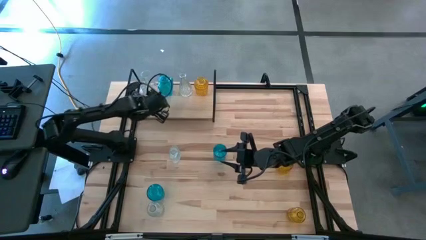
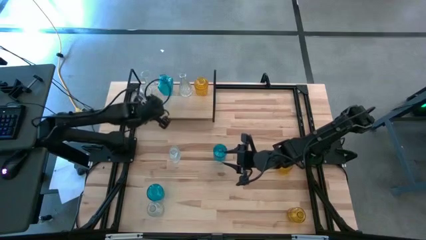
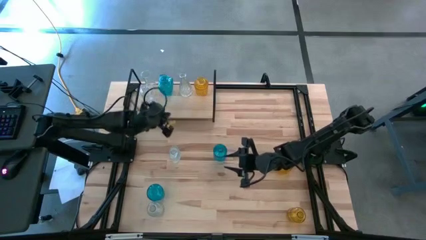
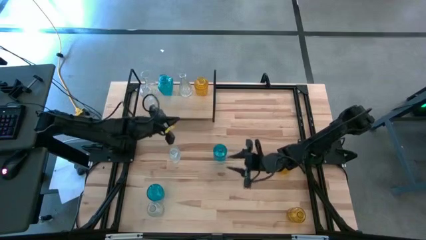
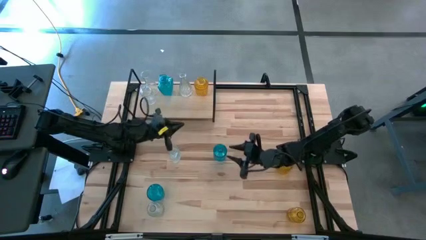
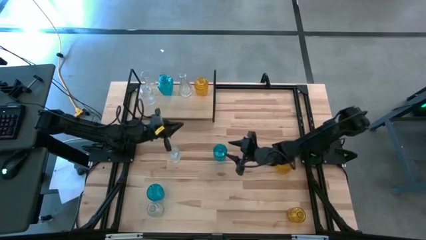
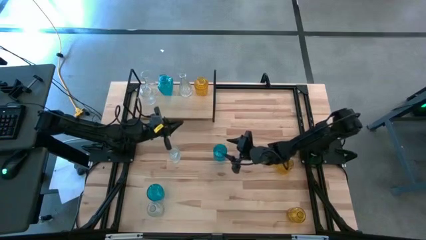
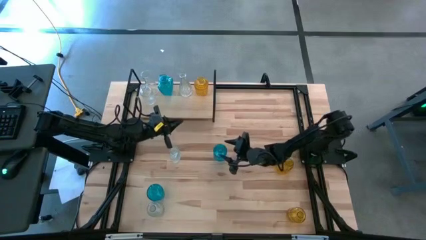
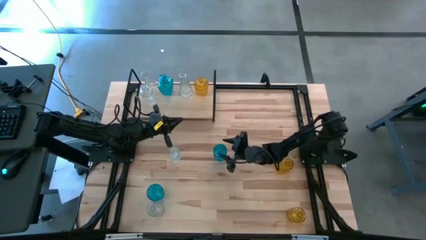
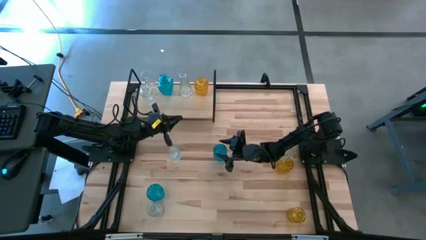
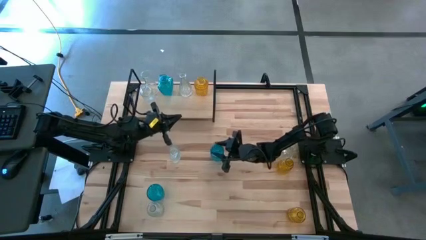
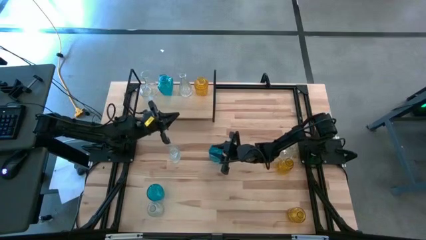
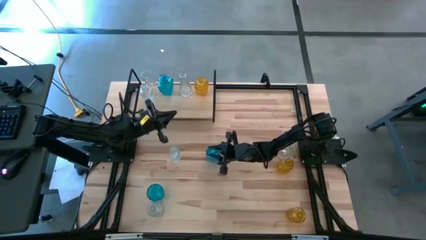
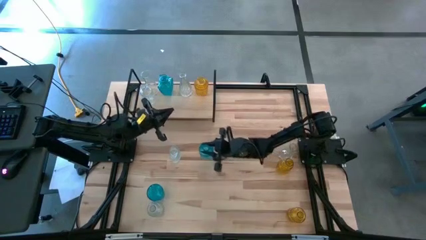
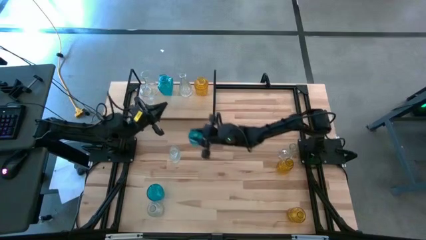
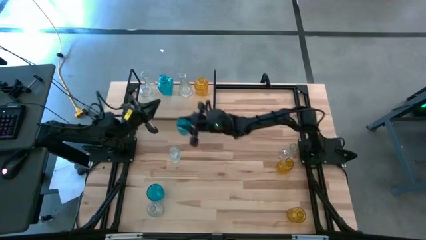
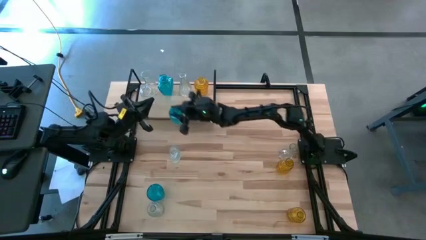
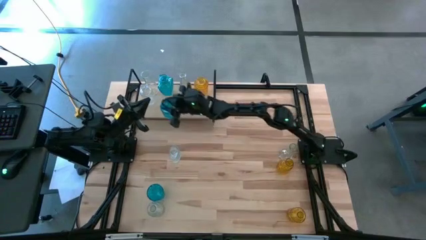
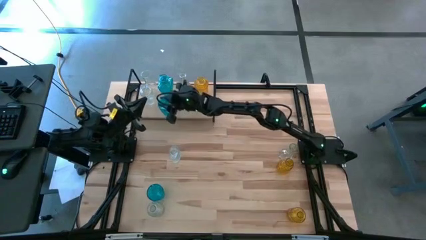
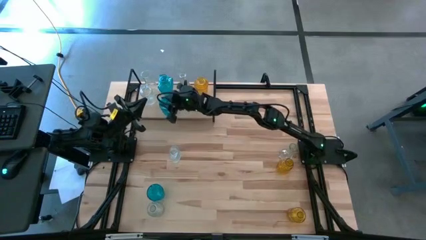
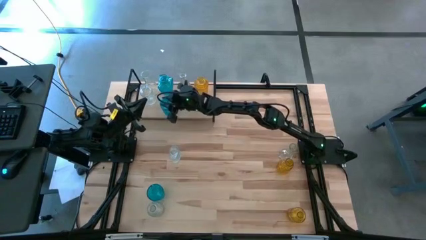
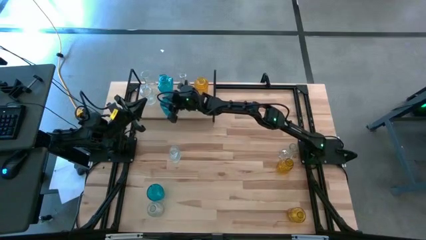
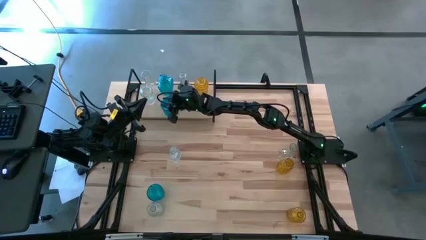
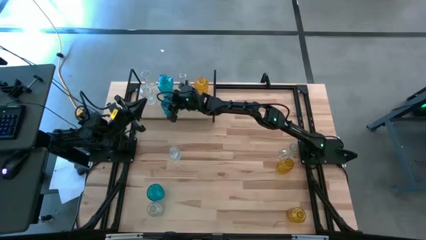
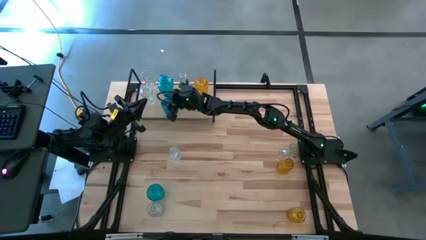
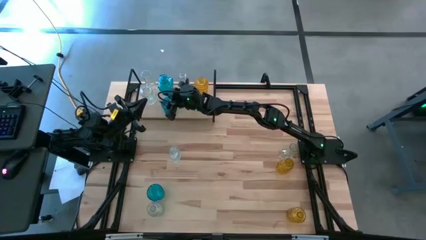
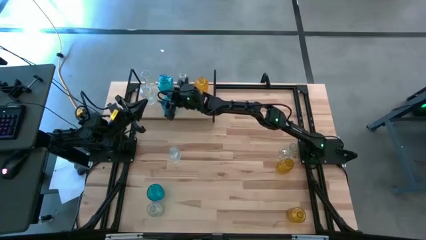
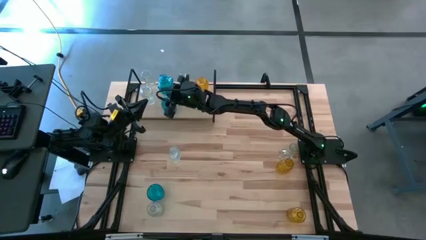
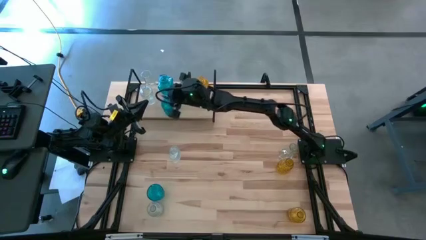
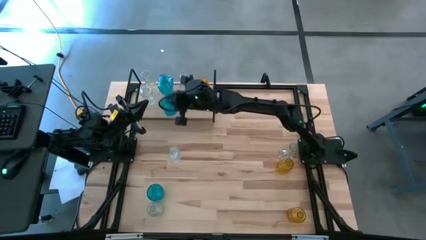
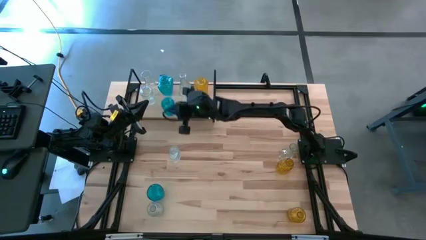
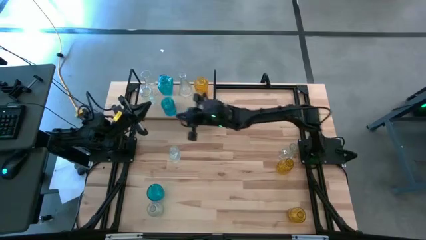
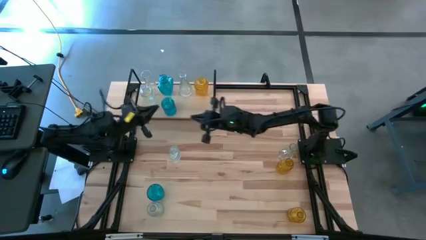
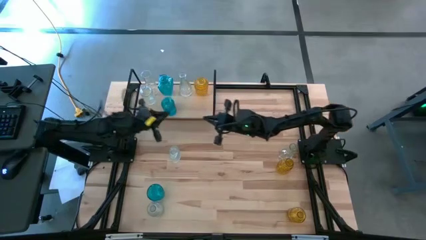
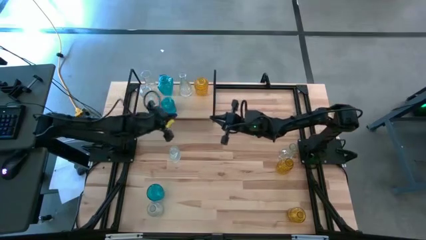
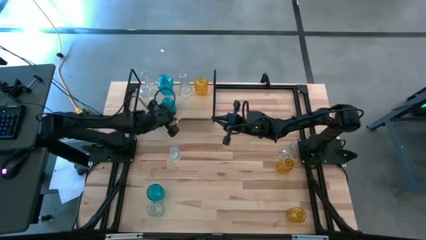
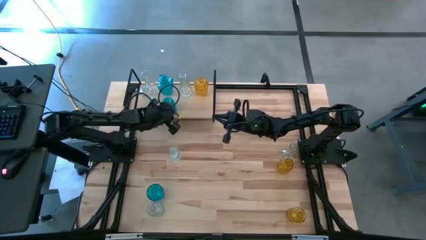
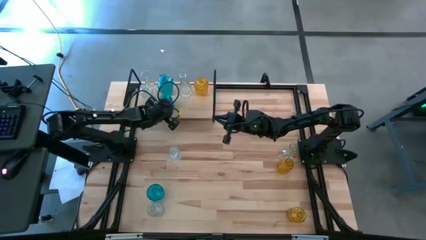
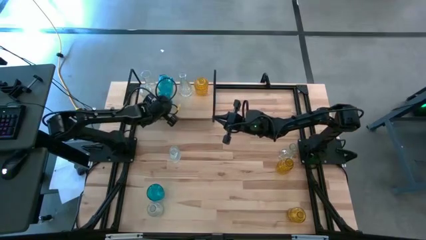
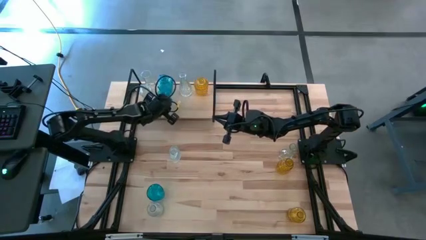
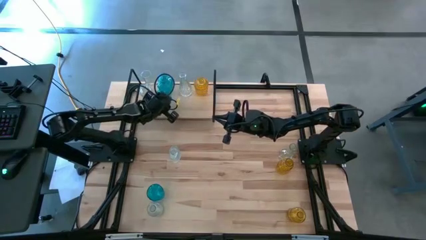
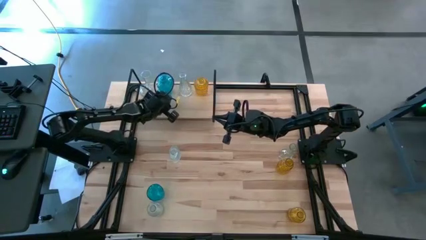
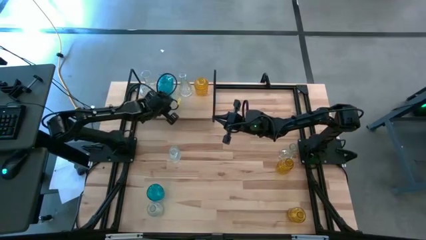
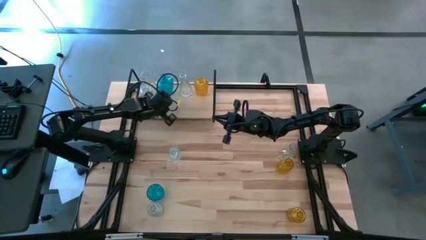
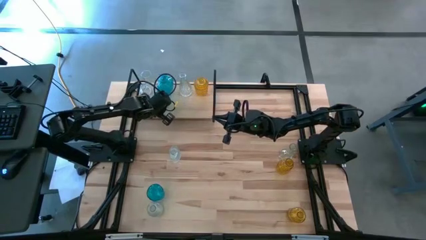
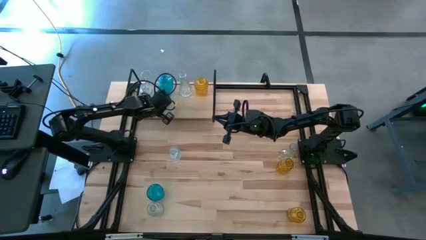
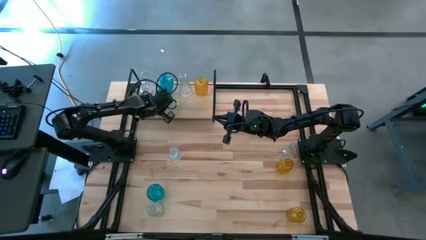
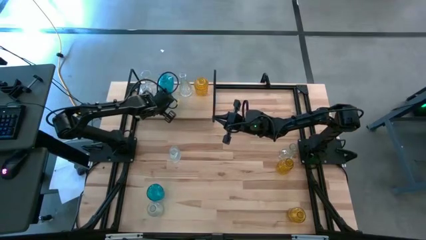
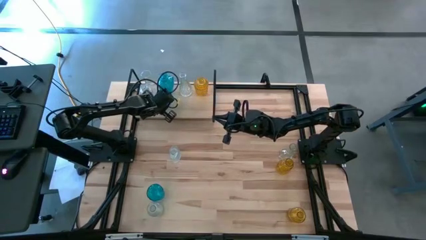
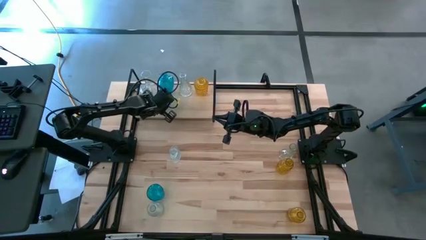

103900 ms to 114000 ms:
Task: sort vases onto shelf
Put the blue vase on the shelf aligned with the other blue vase

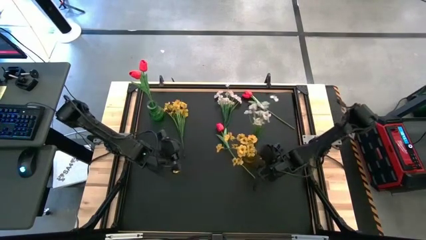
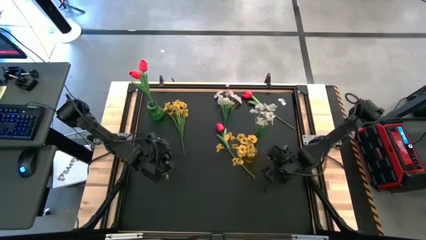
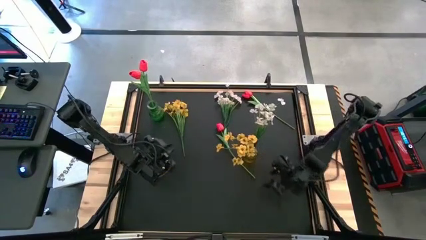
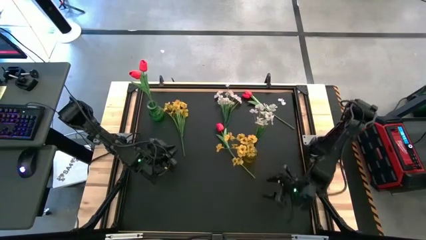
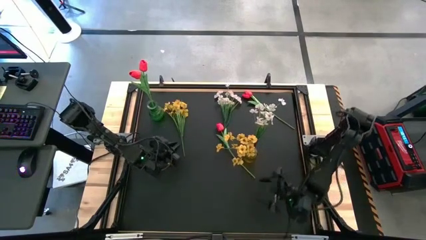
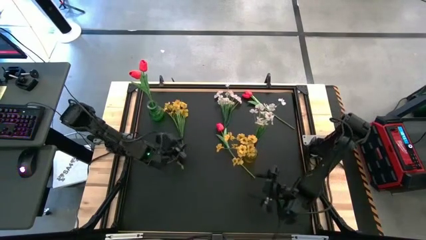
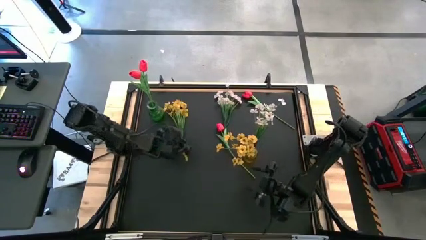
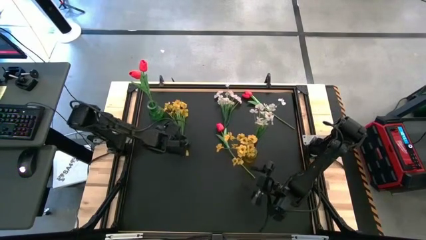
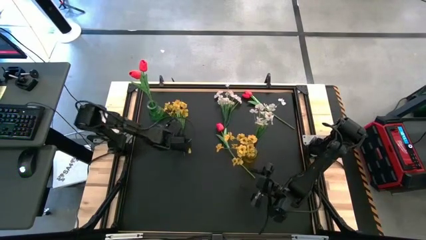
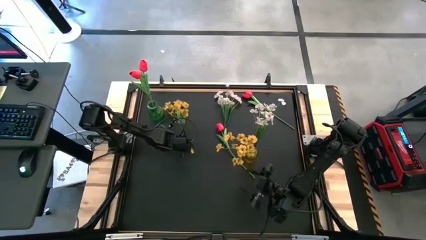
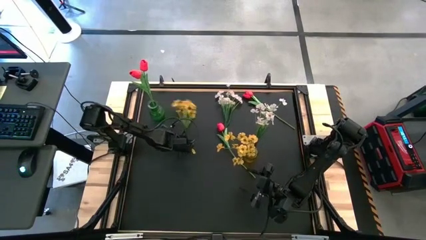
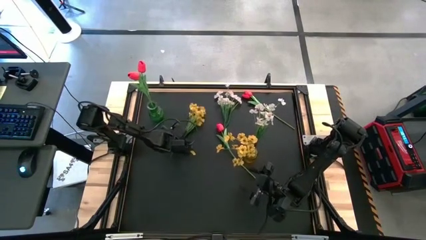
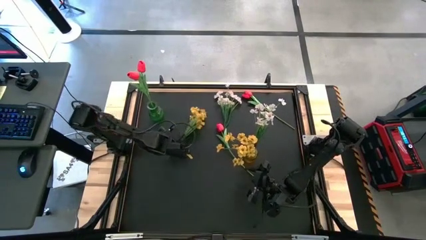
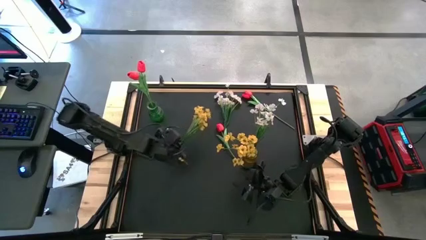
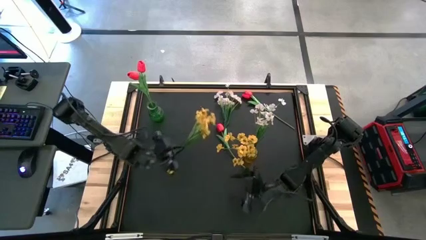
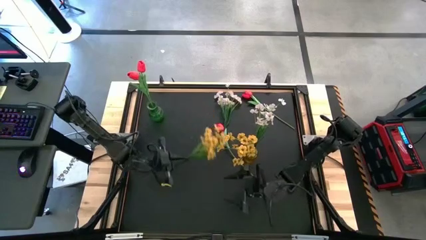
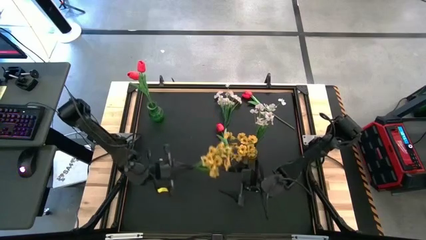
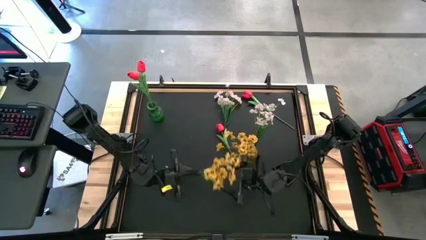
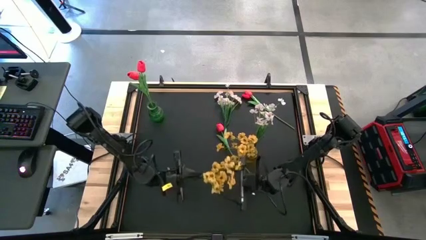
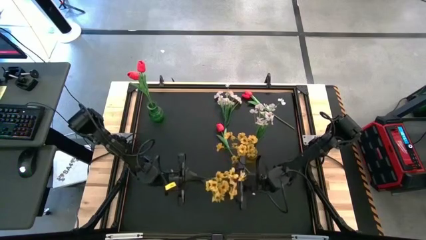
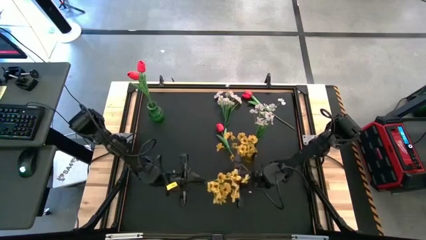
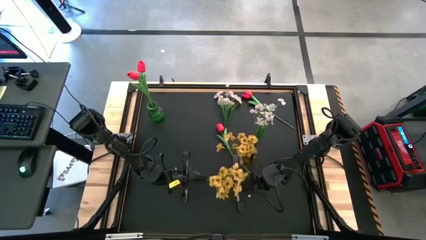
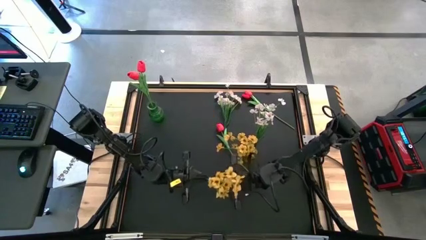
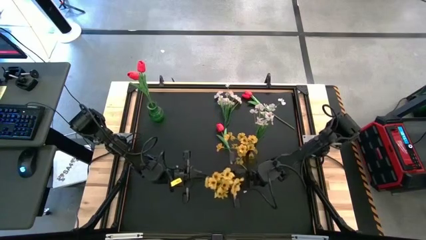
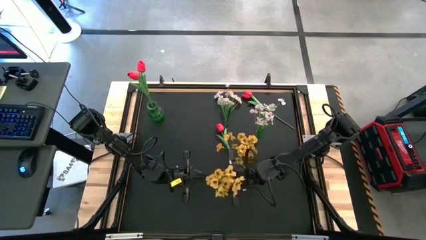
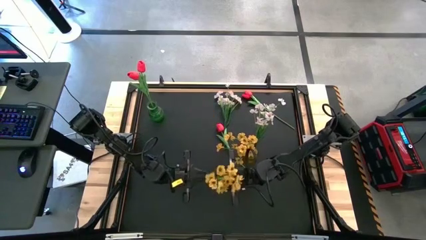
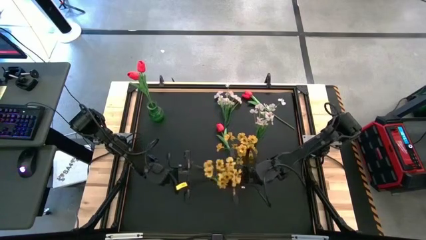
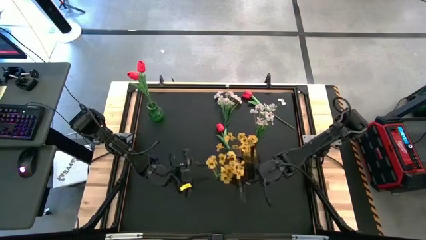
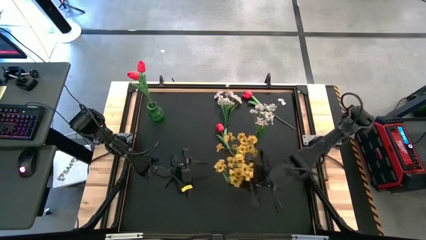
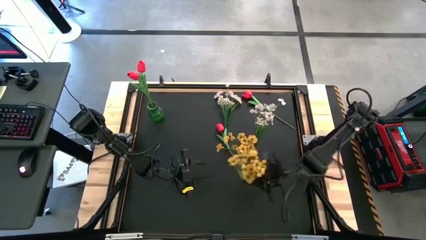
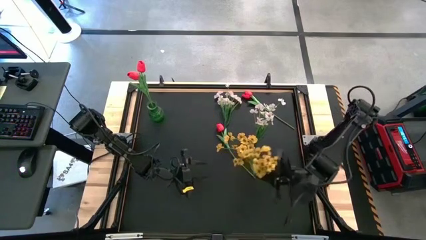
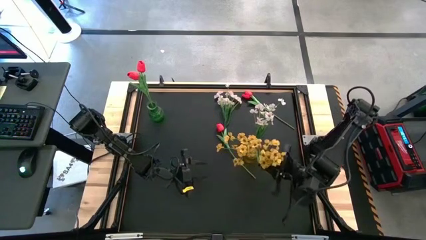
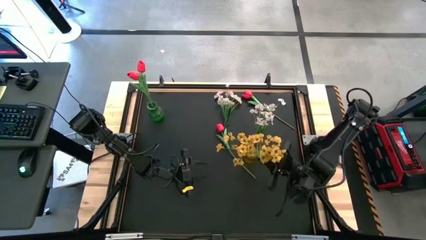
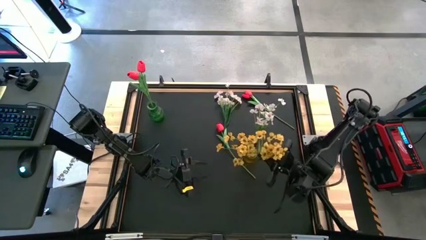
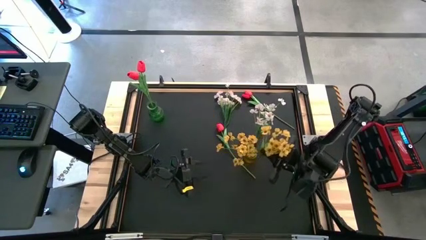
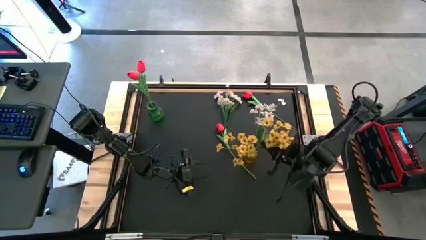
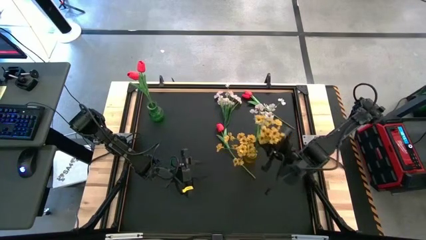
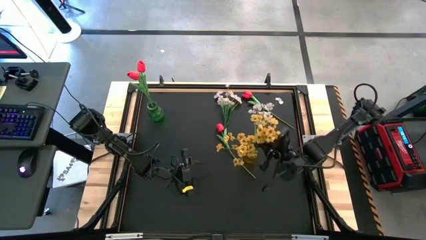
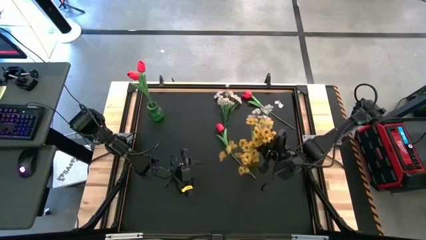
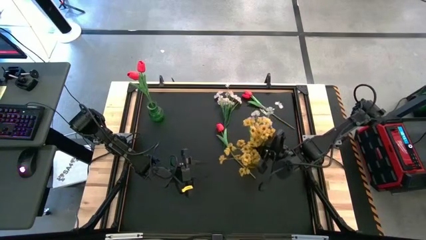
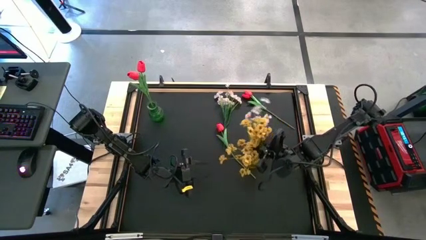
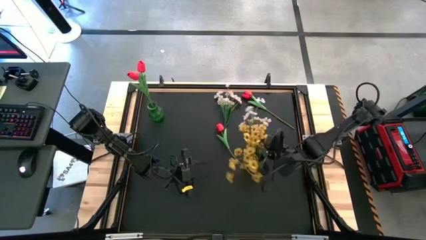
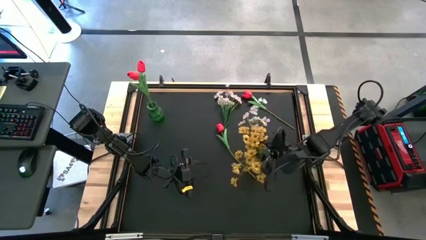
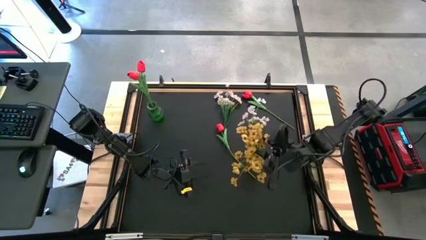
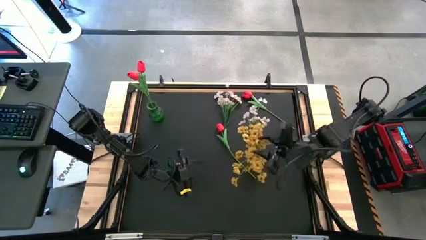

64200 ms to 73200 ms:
Task: Sort flowers into vase by color
Put the yellow flower into the yellow vase
